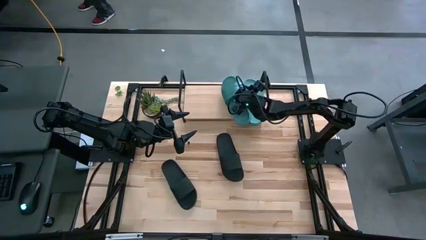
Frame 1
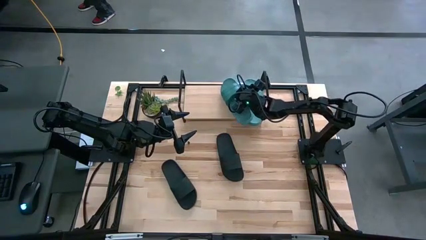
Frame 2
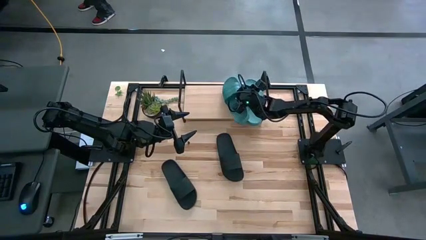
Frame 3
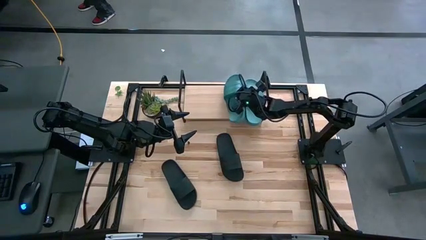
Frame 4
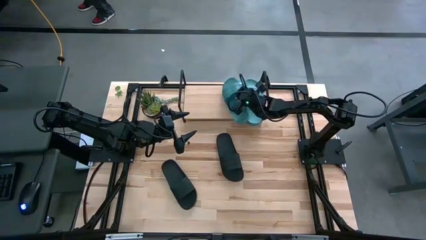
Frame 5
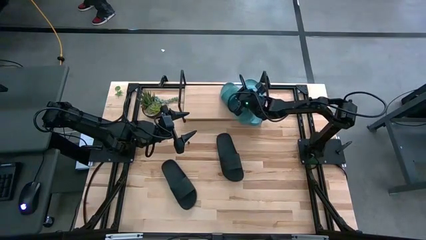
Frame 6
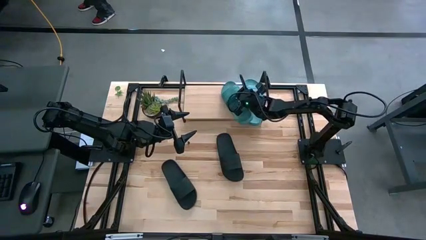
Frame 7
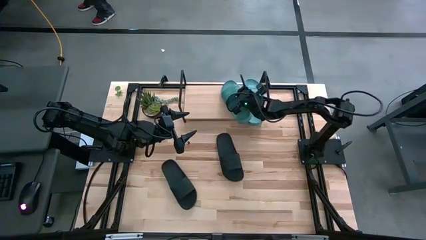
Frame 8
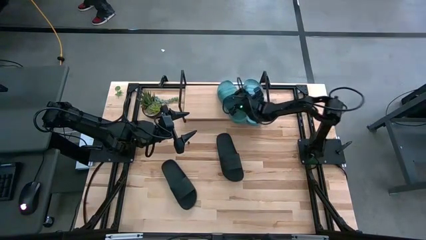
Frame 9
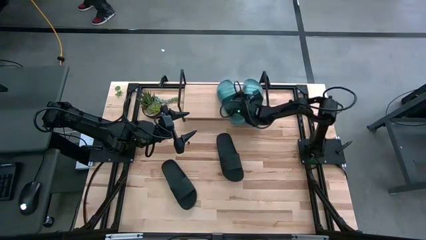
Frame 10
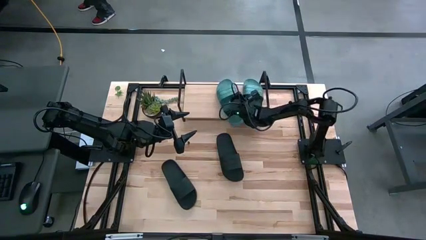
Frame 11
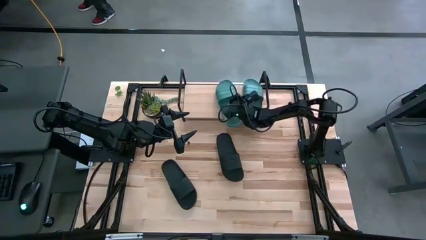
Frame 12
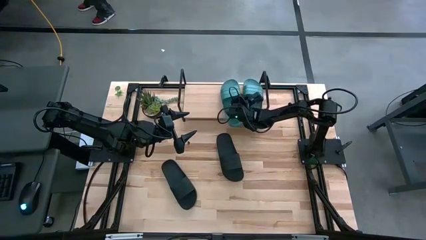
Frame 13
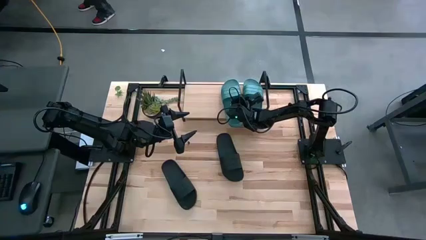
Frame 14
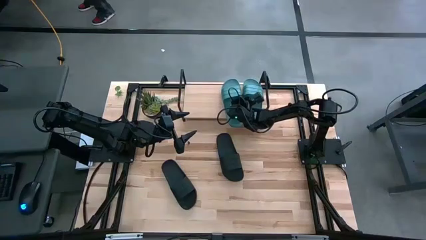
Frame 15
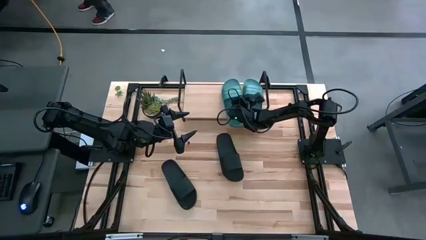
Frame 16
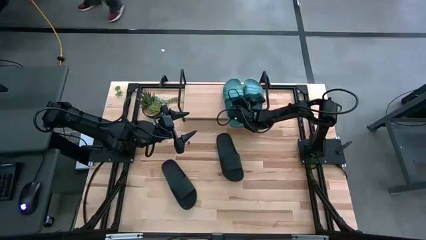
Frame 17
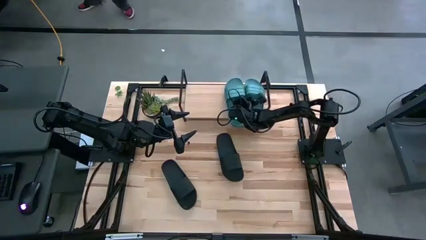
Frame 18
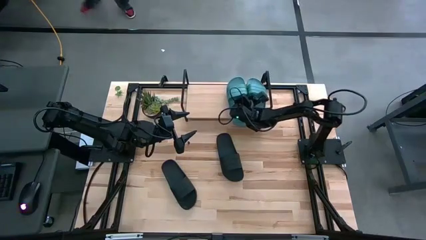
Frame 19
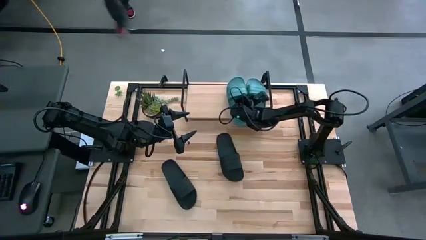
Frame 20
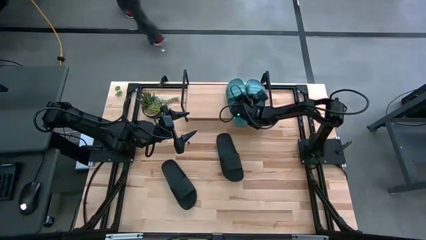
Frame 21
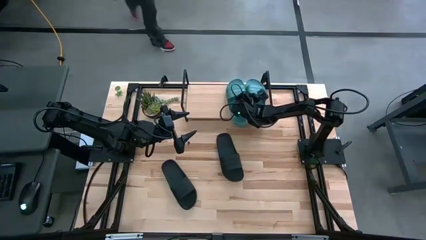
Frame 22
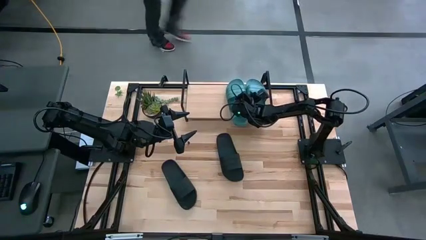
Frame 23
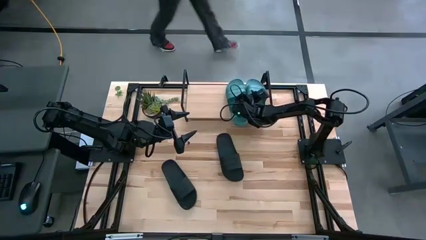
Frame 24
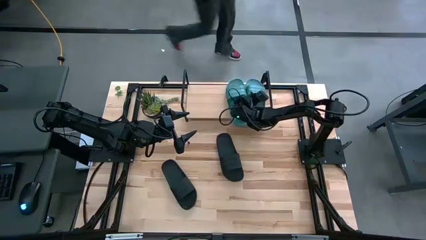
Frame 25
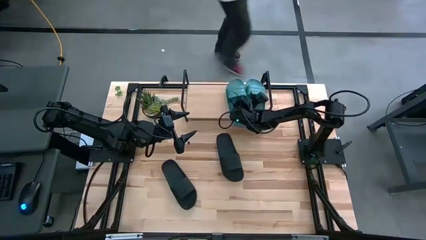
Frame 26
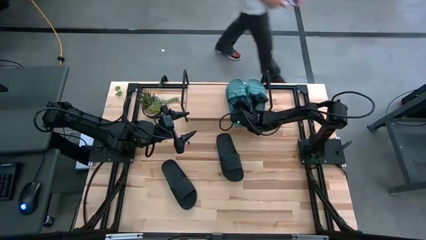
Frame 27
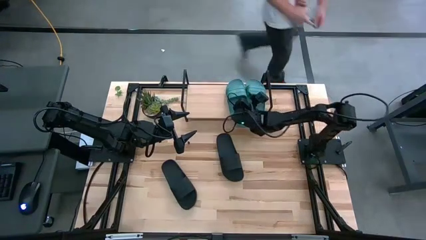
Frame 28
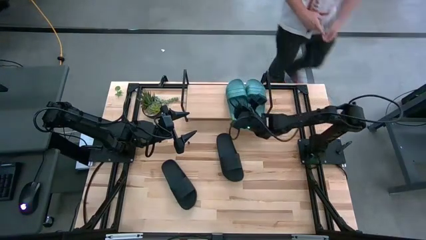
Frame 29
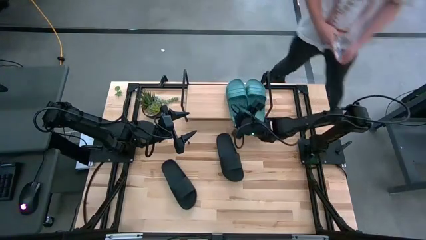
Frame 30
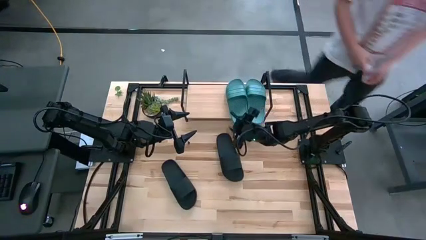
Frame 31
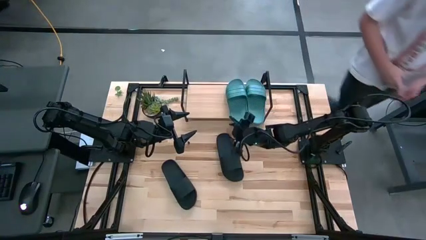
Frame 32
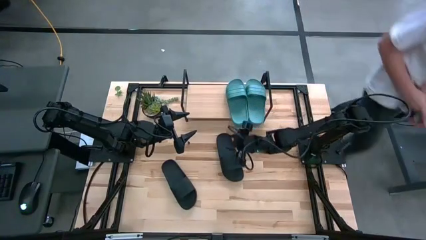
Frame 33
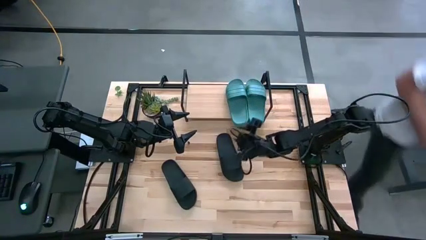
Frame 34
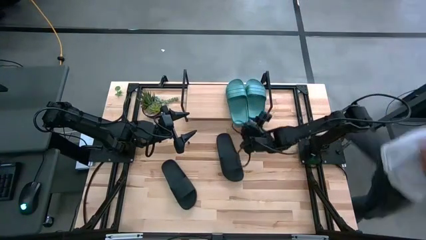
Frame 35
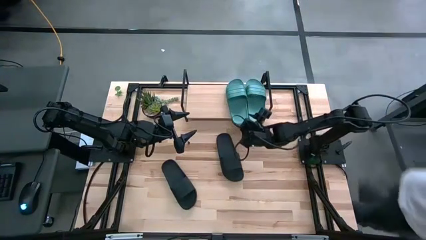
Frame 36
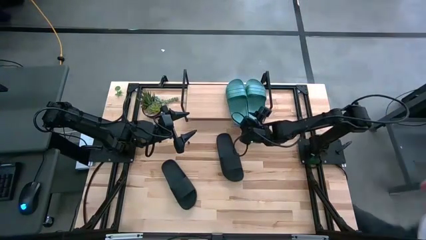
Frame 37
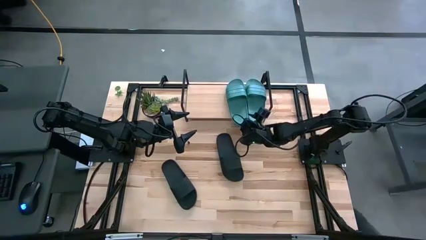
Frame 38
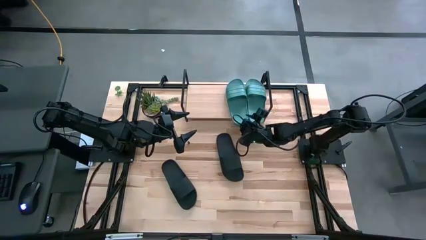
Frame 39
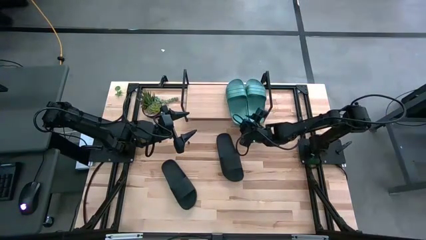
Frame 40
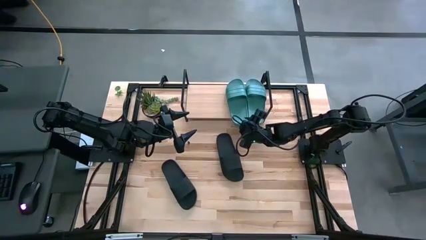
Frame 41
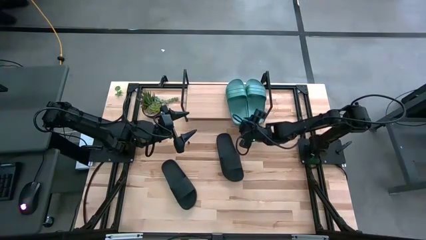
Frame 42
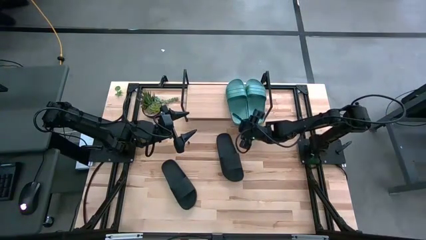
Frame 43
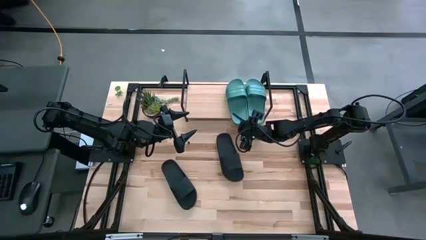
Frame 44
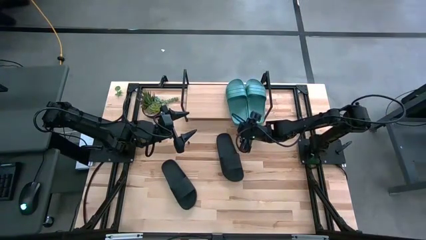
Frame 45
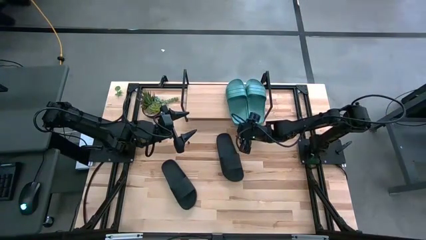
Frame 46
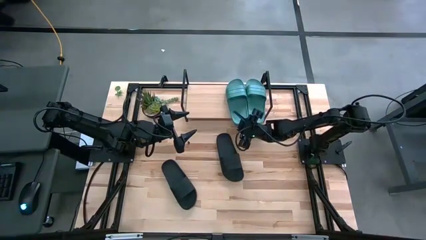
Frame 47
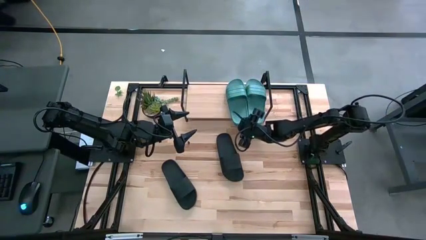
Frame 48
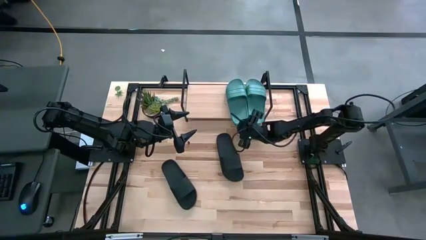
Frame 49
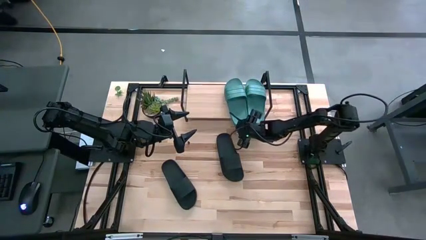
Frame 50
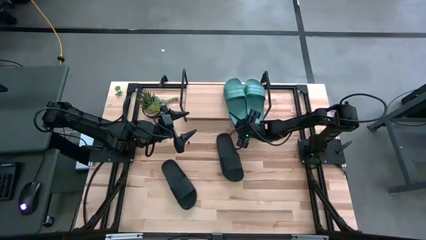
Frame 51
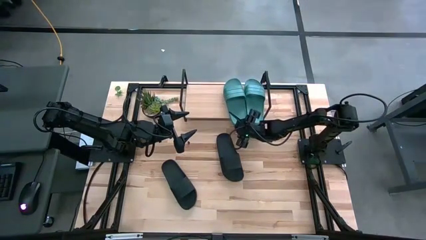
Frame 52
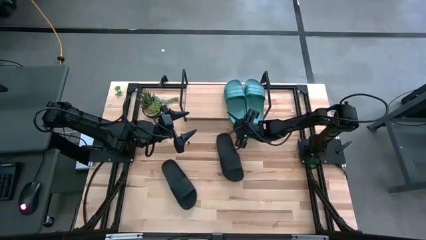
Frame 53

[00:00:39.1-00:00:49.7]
Task: Pick and place slides into the shelf
Put the green slide on the shelf

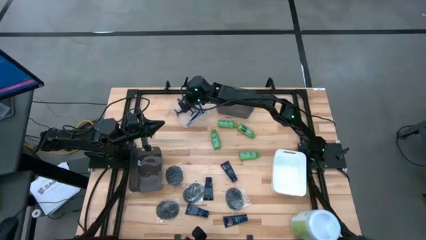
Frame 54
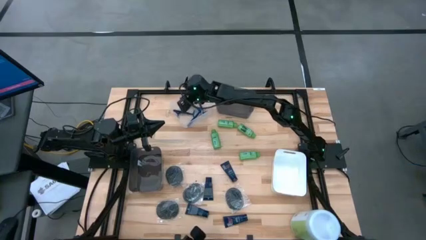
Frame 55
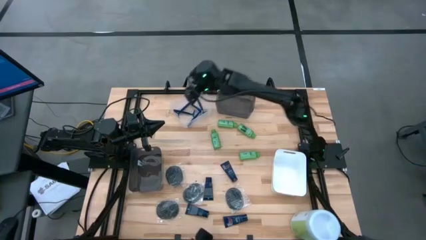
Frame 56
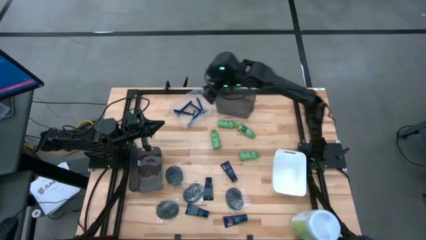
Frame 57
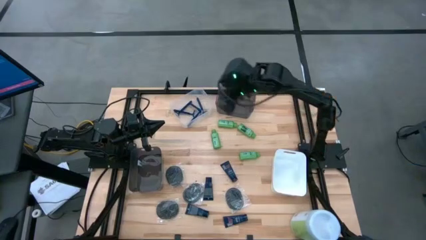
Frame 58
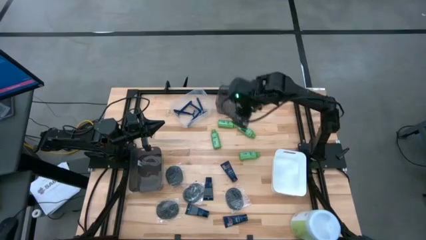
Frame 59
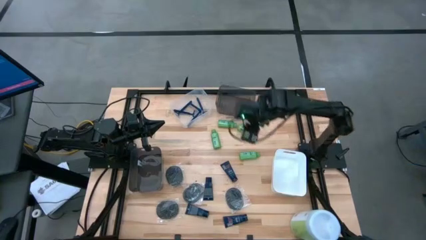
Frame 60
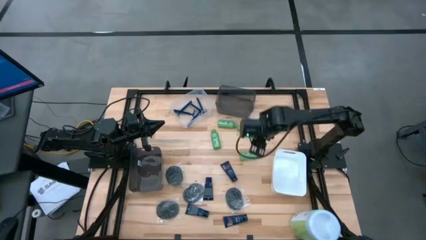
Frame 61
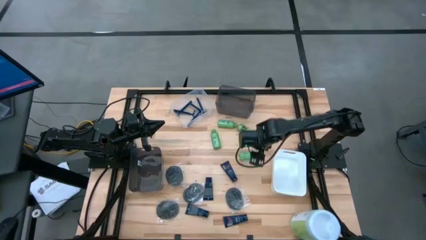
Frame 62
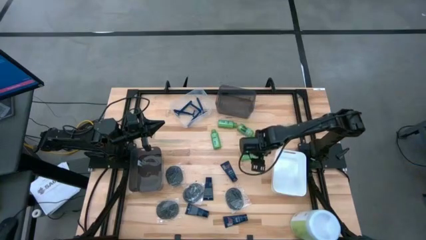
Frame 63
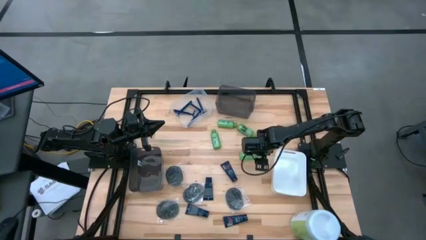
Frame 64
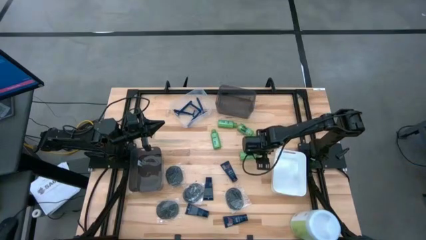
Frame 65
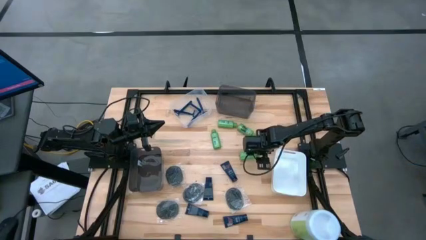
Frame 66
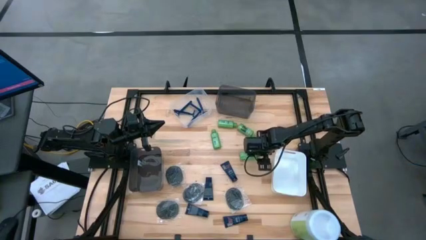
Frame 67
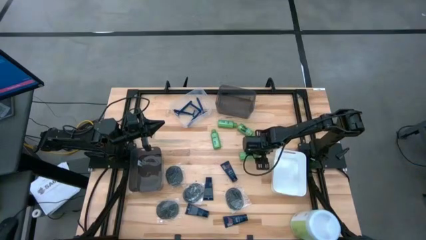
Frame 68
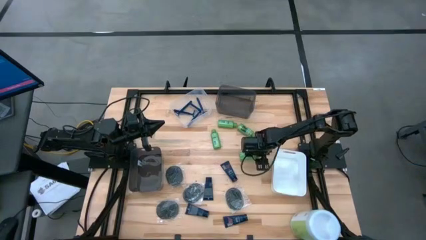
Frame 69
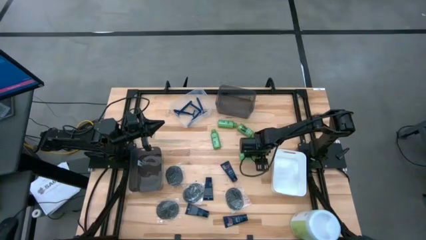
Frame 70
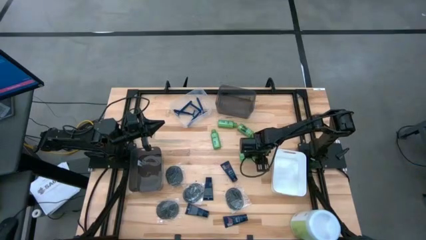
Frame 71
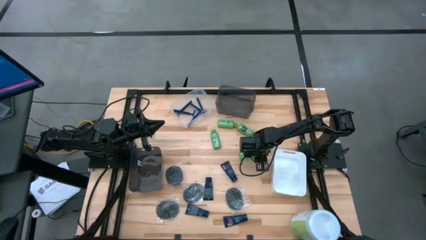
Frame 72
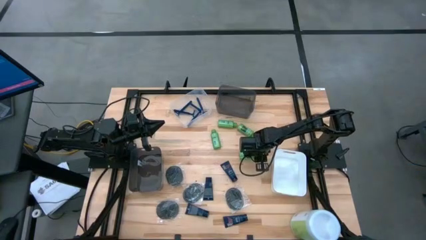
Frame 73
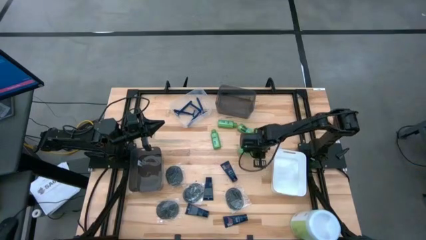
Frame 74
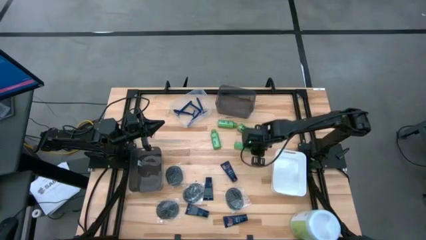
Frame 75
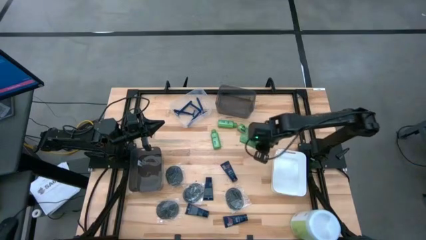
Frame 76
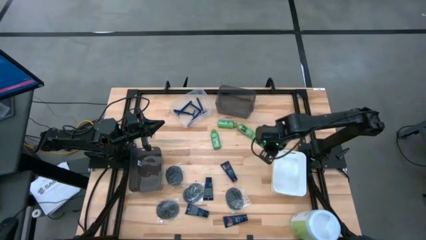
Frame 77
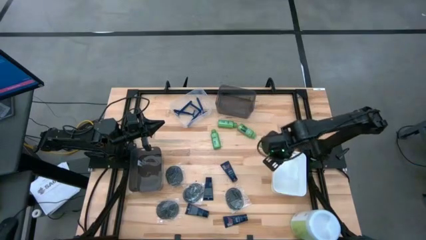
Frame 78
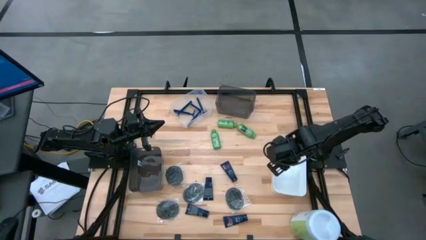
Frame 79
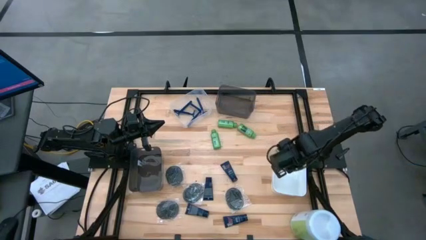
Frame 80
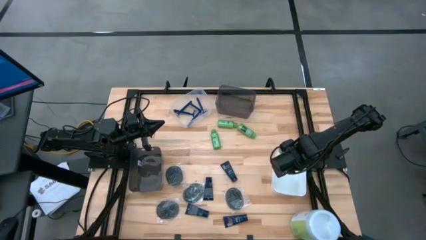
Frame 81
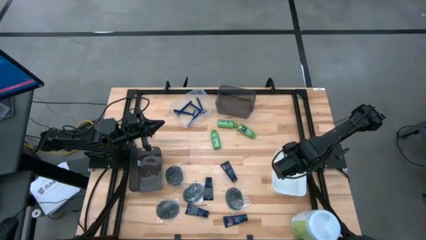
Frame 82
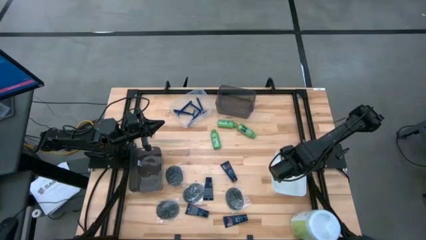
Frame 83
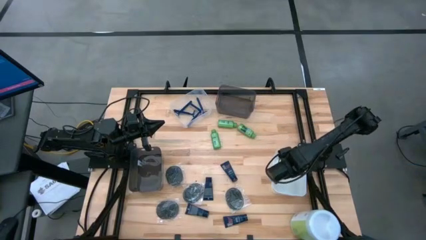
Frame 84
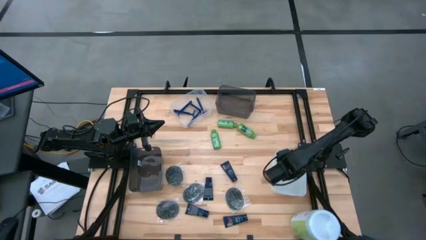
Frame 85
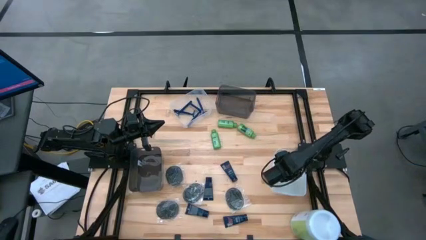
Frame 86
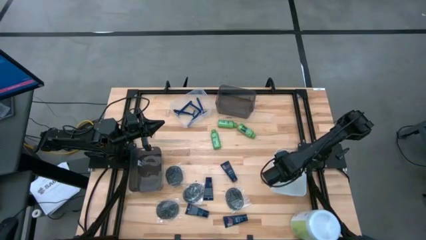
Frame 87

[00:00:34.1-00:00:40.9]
Task: Pick & Place Travel size toiletries
Put the green shampoo into the white bin
